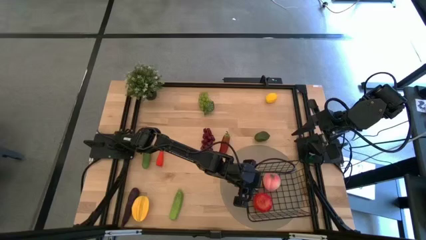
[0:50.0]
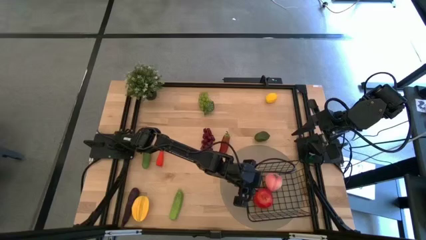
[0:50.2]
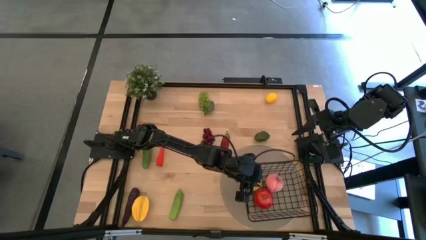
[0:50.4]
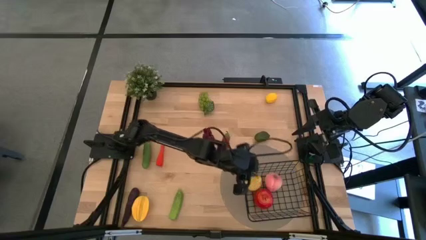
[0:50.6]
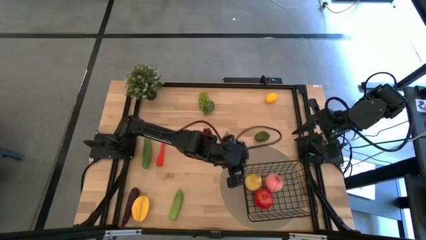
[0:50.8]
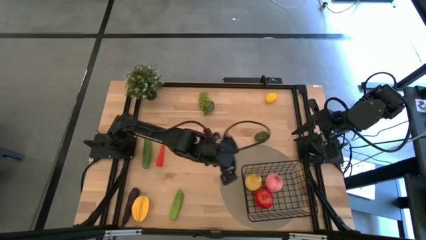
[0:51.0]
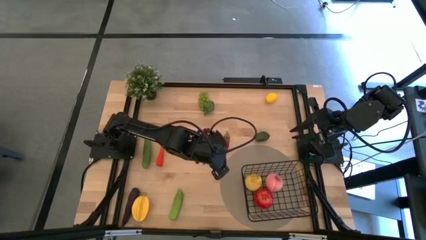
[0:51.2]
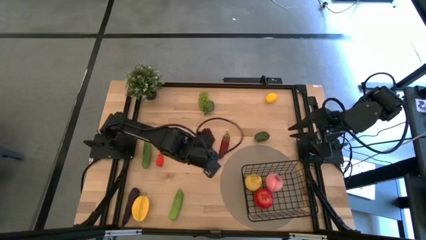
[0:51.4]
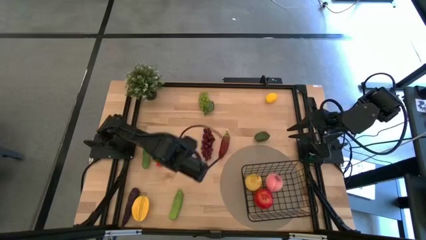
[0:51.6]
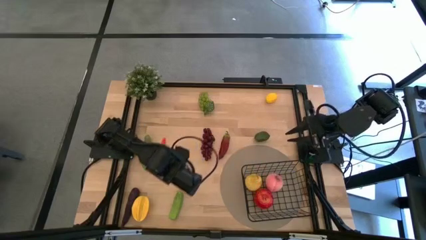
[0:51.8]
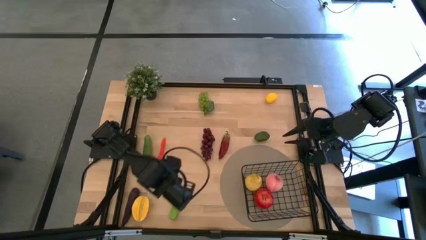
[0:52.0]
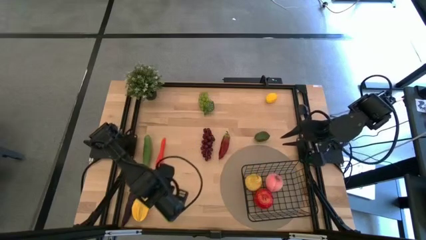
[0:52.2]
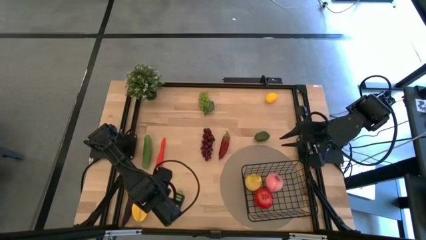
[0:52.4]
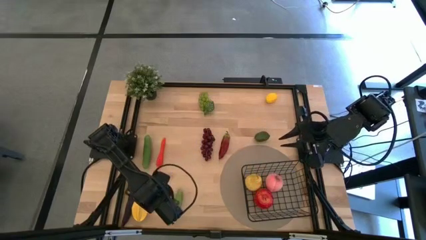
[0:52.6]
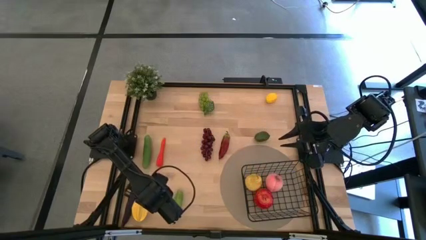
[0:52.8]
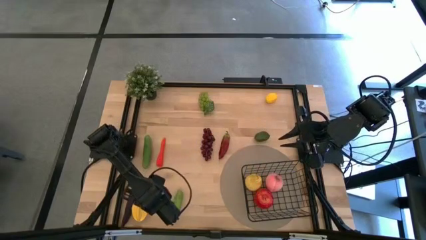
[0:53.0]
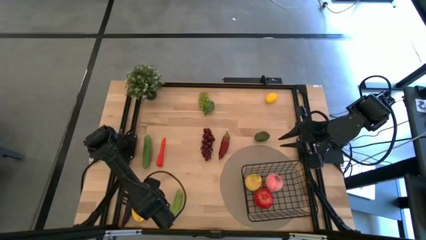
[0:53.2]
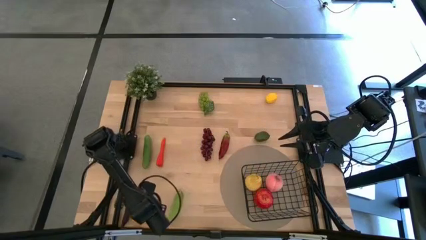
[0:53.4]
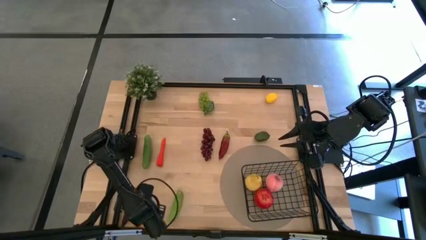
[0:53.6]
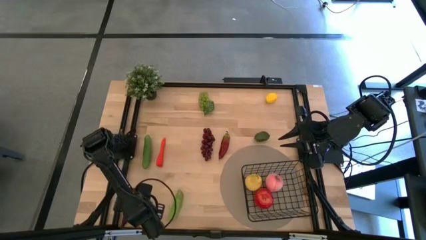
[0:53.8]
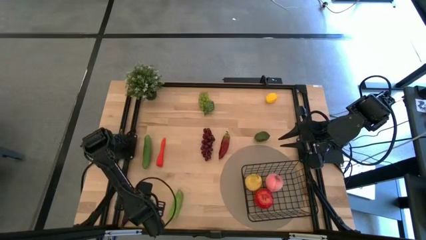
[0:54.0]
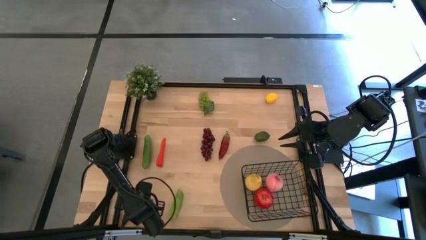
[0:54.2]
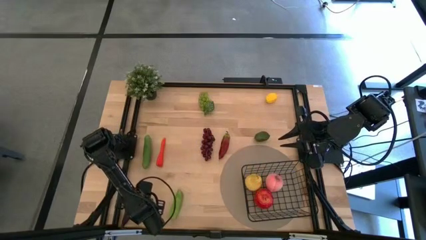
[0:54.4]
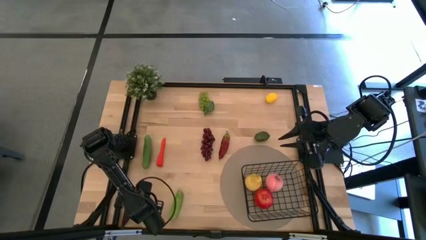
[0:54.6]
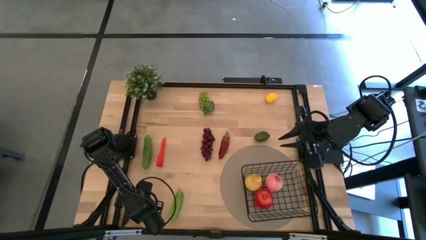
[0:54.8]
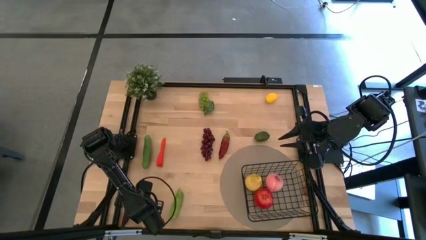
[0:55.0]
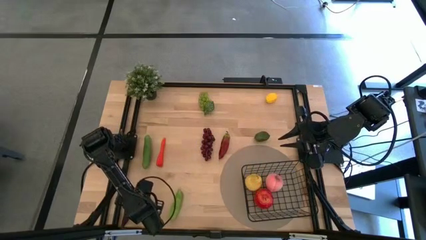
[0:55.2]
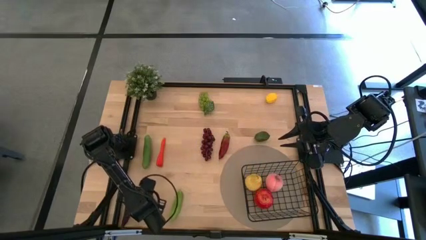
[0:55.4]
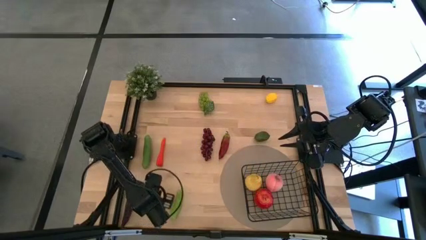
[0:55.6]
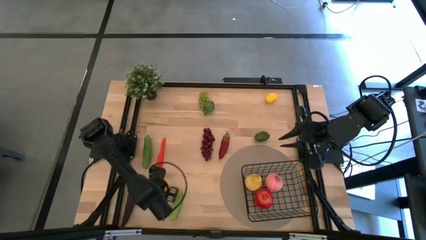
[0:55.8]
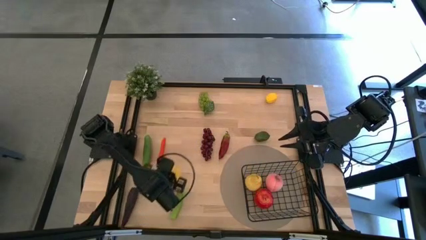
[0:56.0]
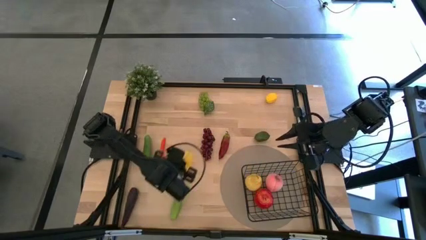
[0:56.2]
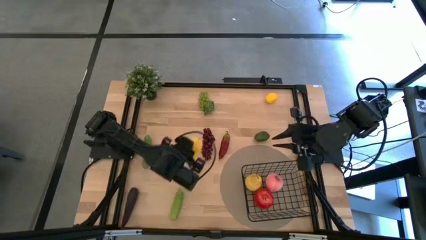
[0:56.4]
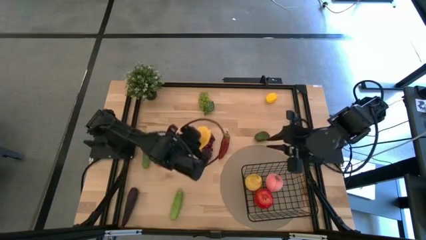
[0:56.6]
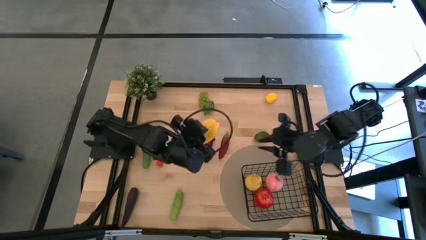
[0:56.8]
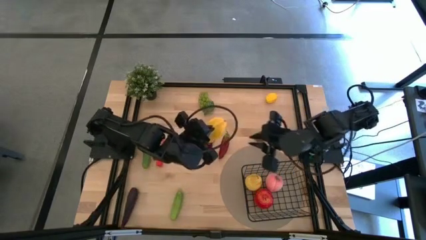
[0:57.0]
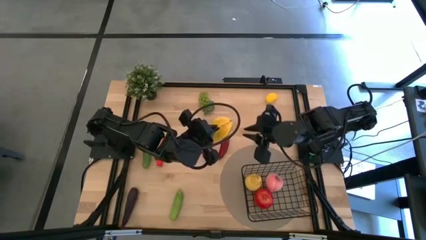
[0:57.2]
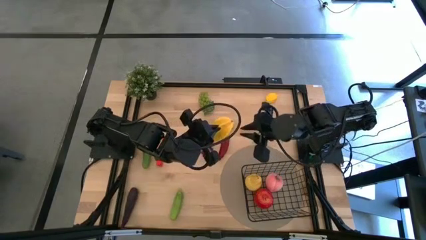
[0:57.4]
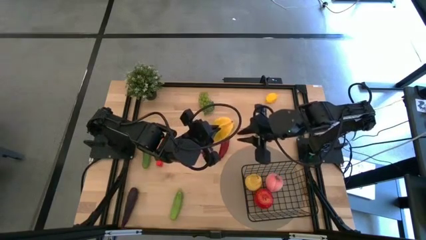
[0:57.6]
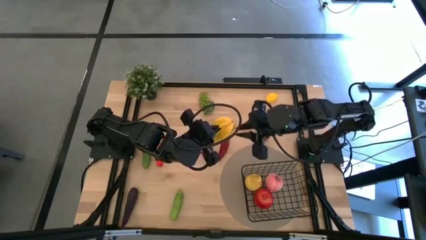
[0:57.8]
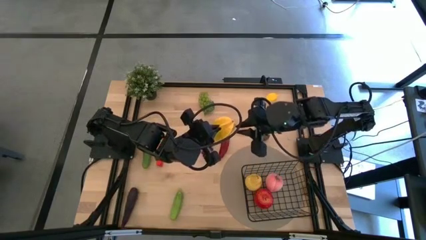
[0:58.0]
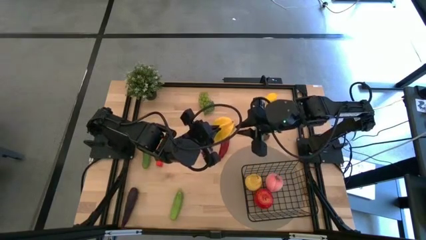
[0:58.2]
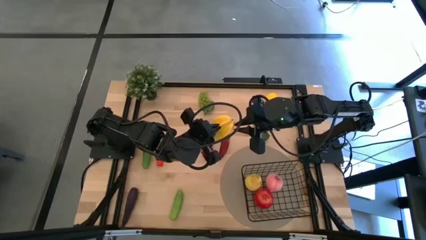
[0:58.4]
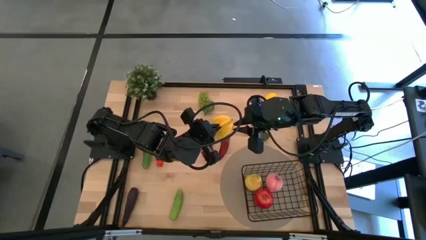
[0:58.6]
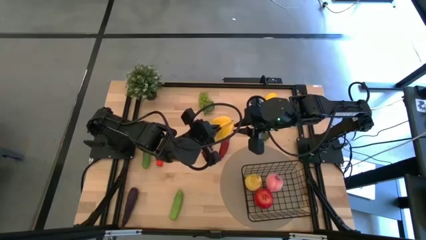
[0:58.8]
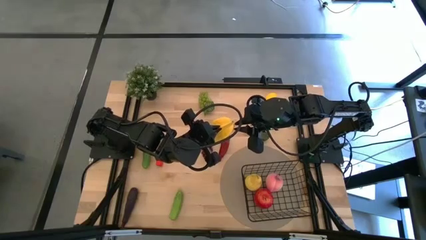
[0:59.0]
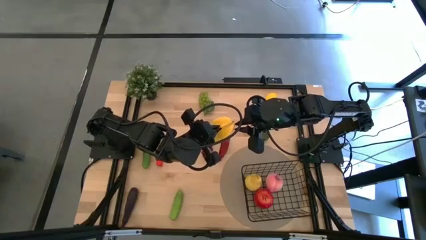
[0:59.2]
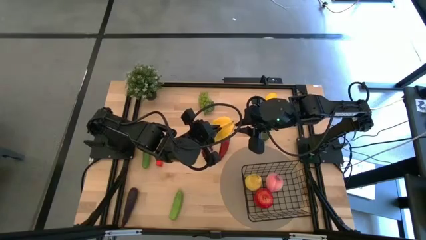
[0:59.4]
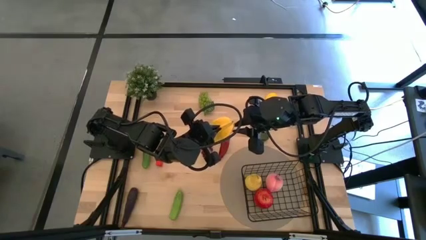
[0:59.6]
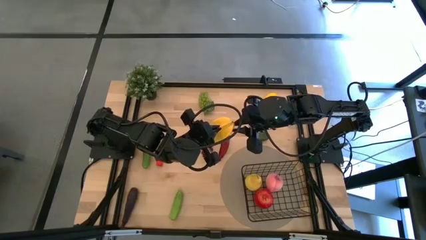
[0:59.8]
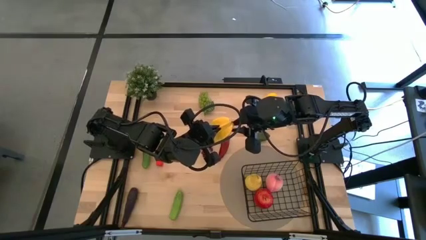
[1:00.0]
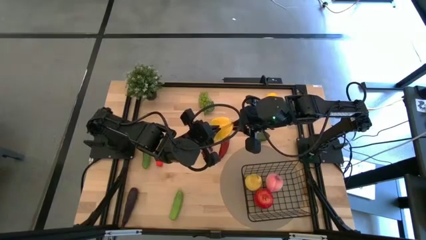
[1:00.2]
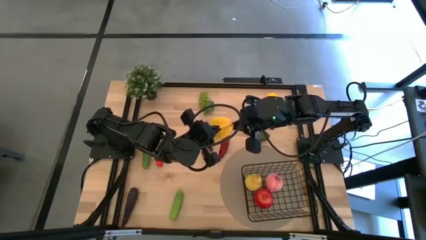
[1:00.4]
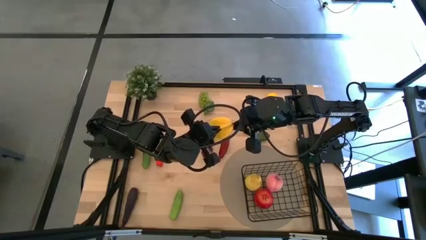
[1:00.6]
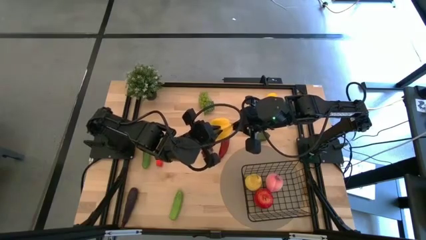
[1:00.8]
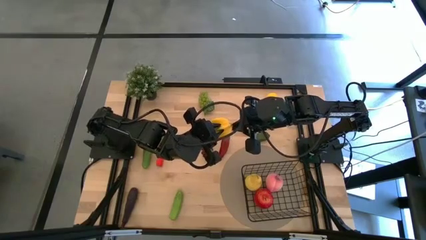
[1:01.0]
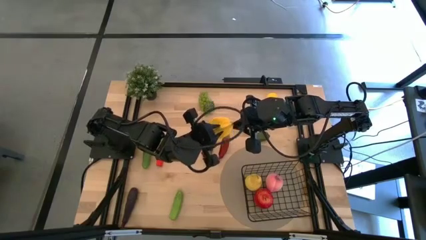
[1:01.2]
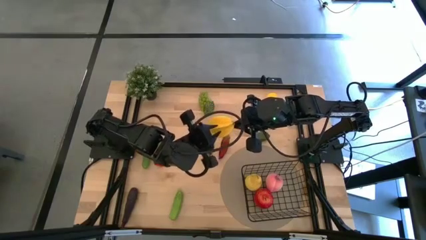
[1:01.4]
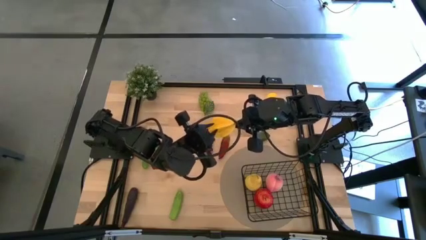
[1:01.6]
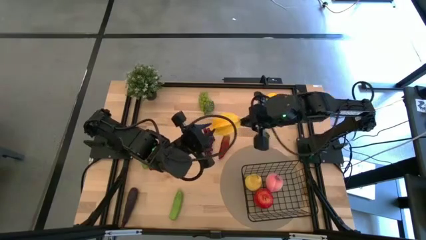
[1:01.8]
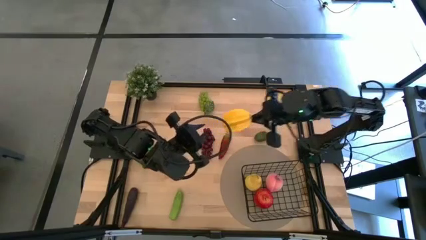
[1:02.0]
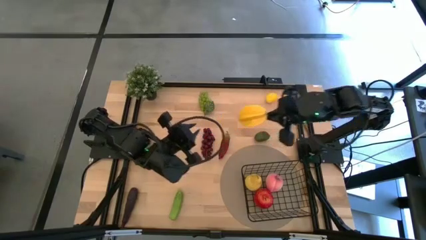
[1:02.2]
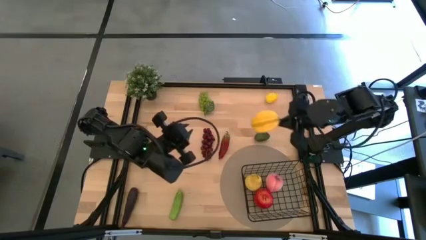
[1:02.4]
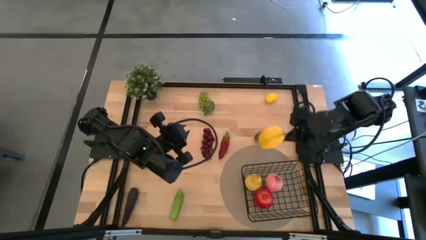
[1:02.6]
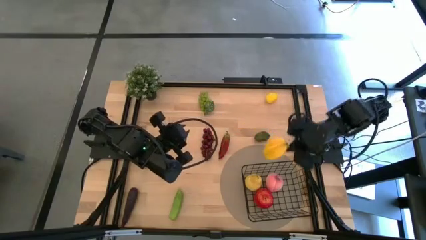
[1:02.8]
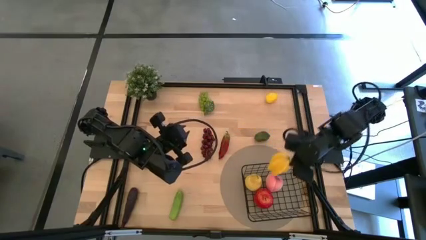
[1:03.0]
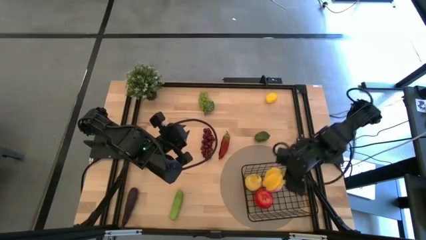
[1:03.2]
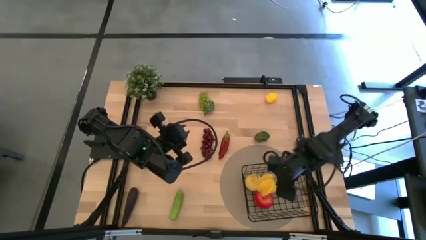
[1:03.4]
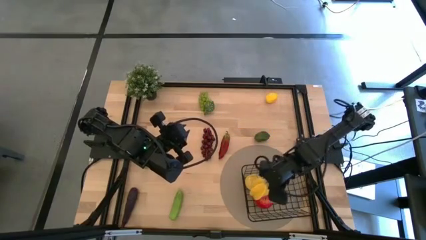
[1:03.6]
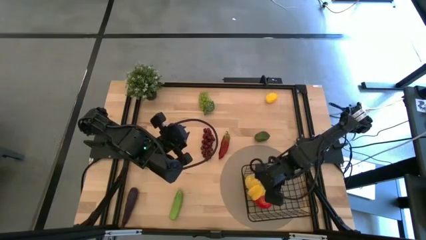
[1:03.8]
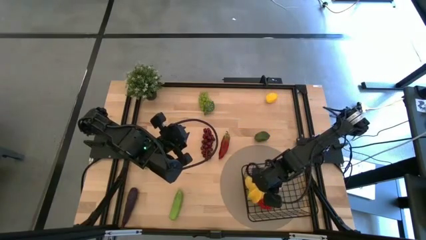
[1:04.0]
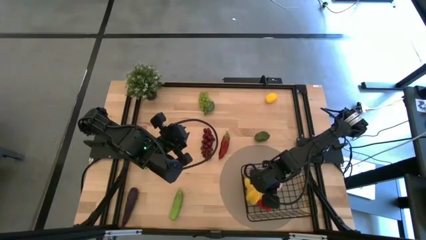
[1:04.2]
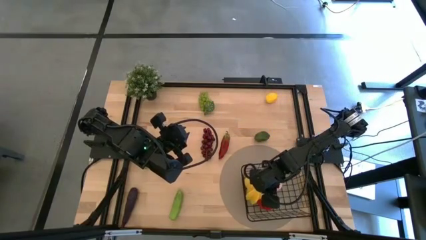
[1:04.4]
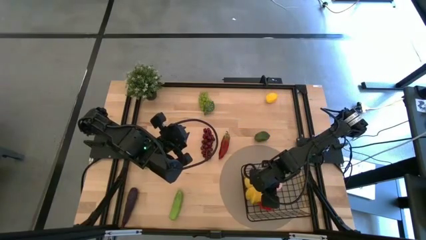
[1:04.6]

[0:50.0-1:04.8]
Task: Build produce basket
Put the star fruit into the wire basket
